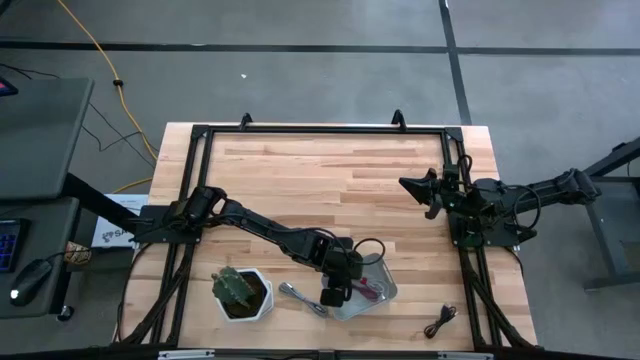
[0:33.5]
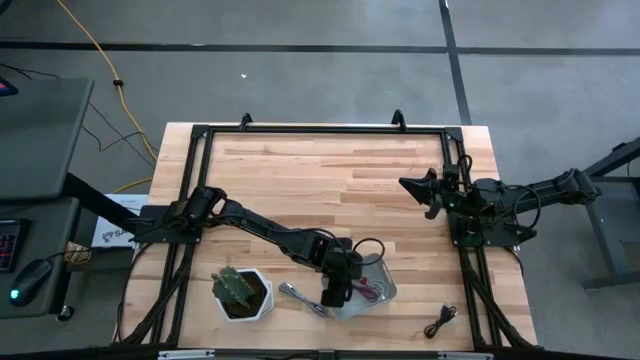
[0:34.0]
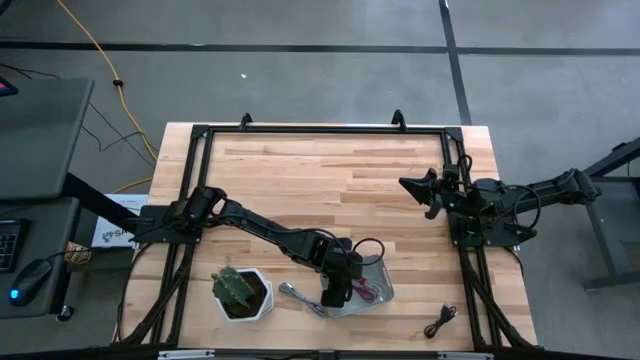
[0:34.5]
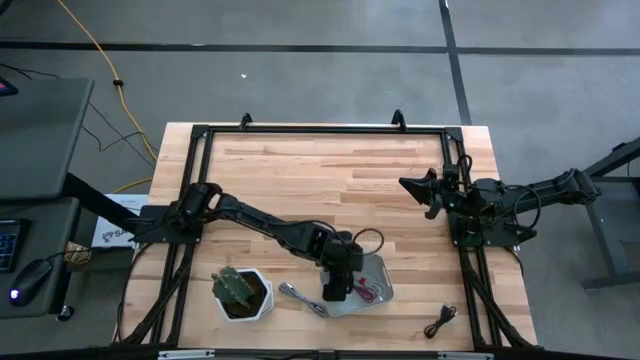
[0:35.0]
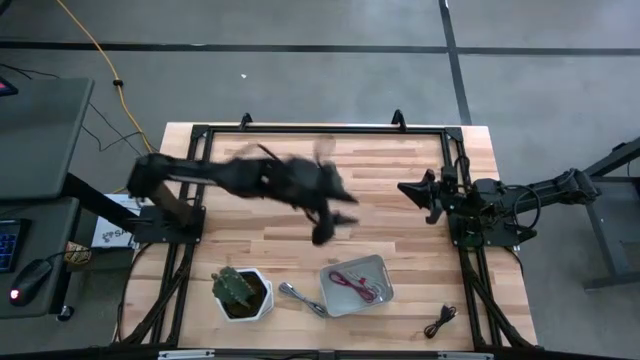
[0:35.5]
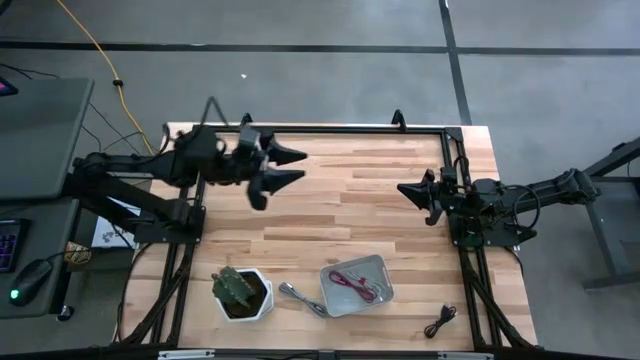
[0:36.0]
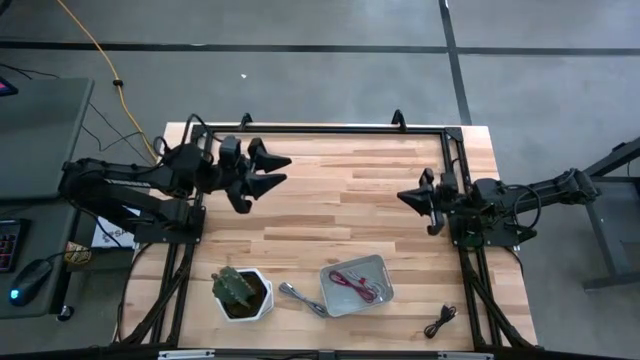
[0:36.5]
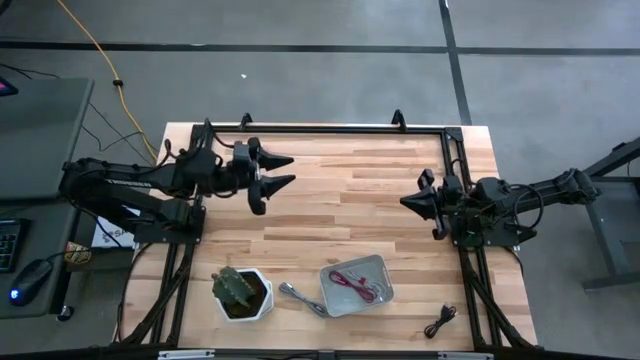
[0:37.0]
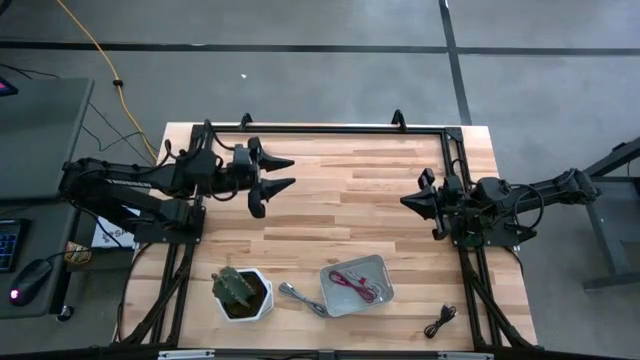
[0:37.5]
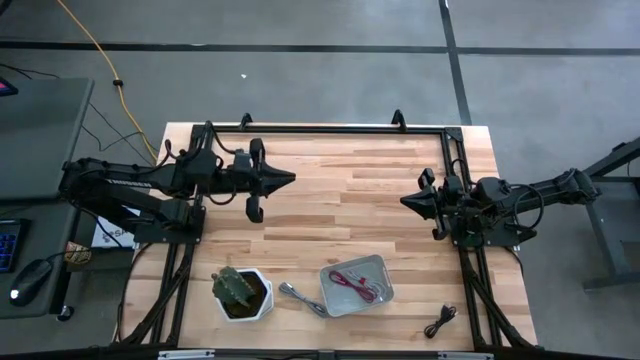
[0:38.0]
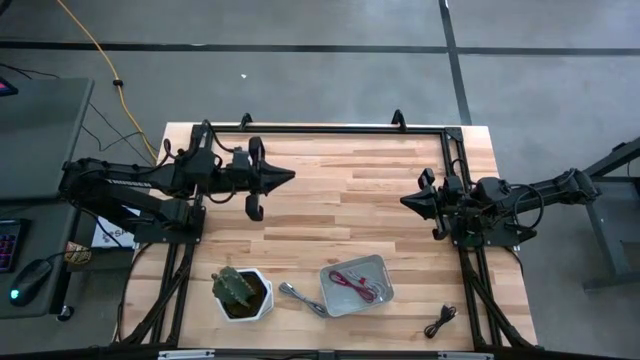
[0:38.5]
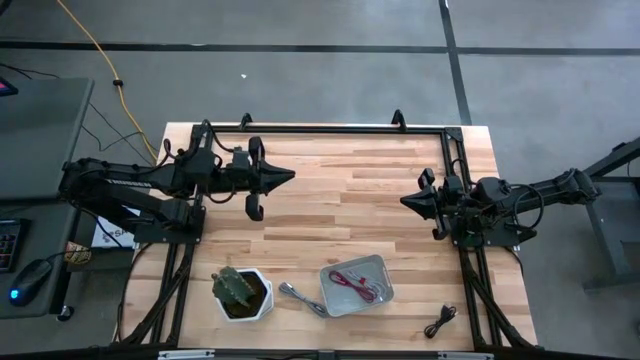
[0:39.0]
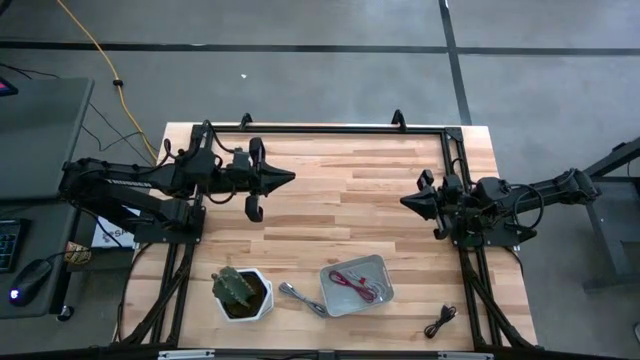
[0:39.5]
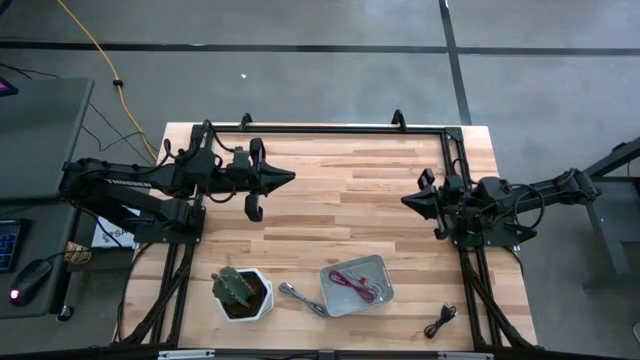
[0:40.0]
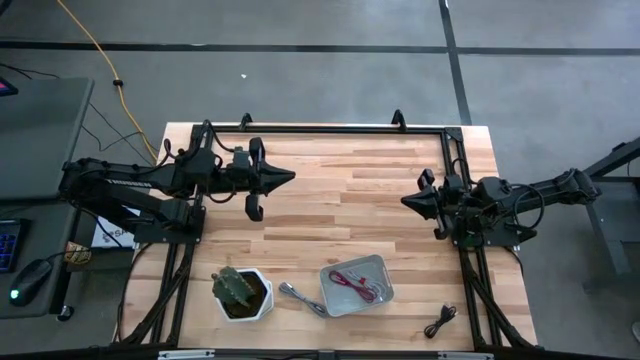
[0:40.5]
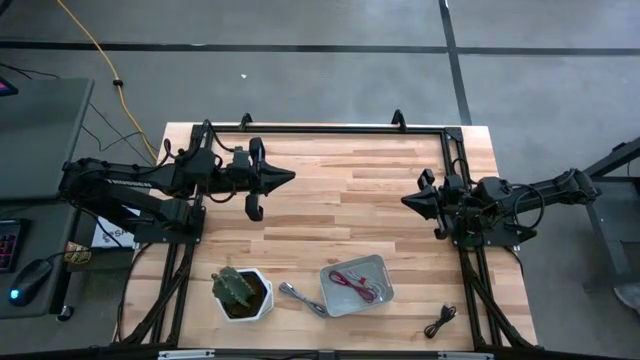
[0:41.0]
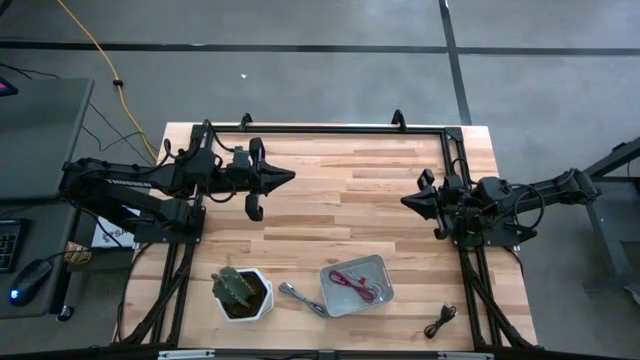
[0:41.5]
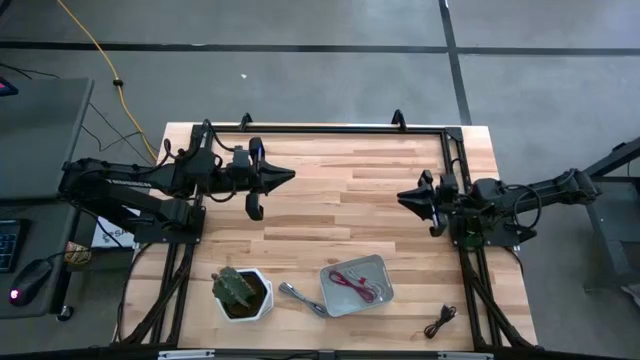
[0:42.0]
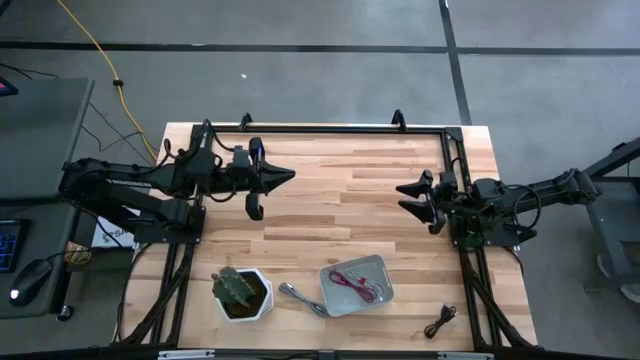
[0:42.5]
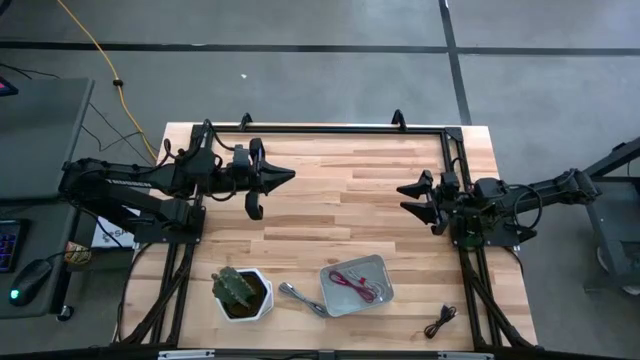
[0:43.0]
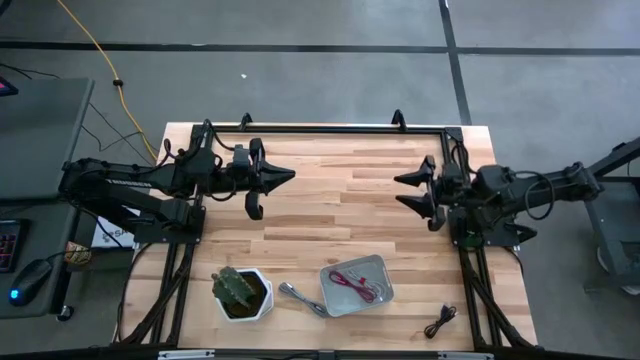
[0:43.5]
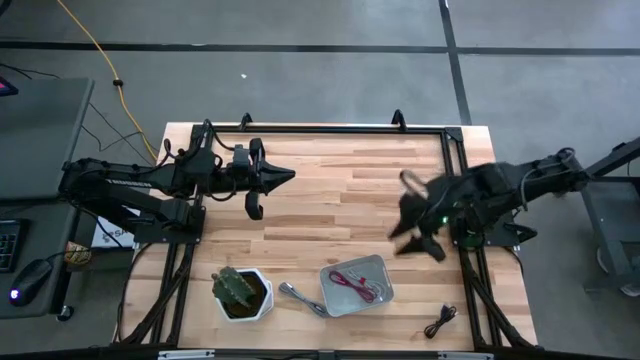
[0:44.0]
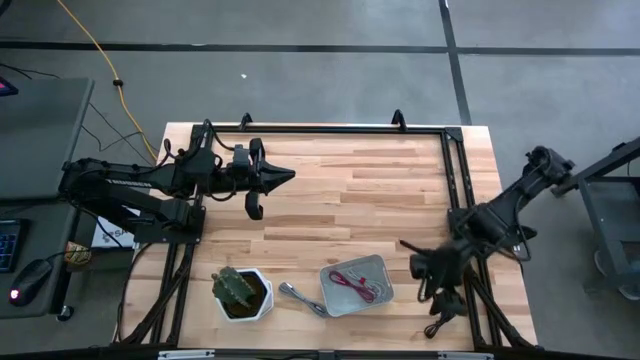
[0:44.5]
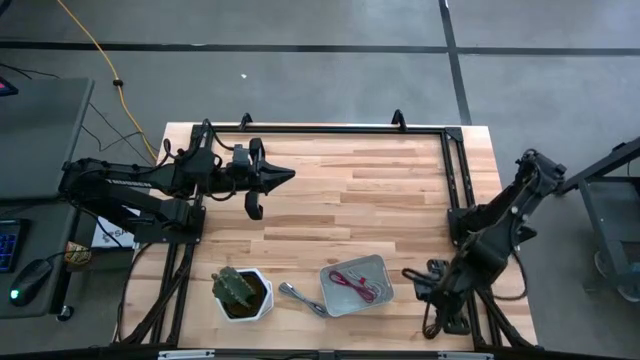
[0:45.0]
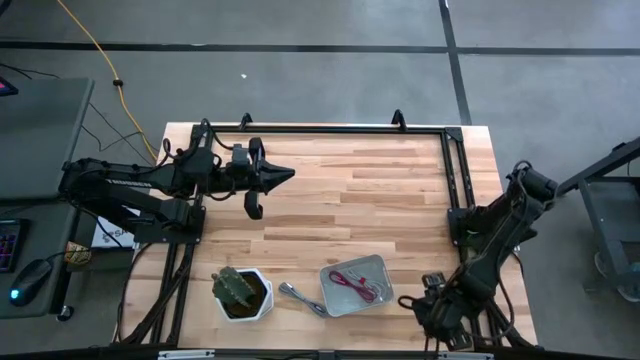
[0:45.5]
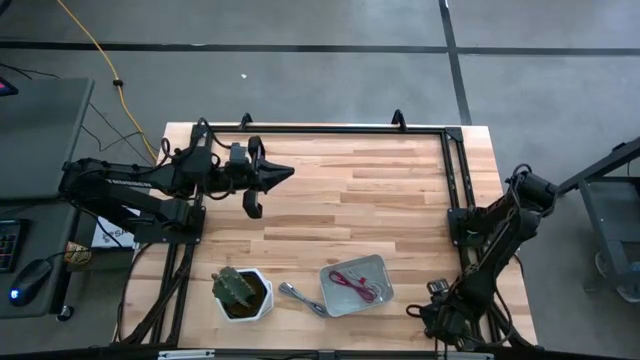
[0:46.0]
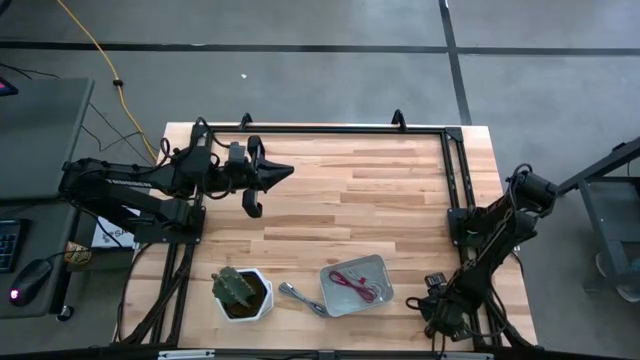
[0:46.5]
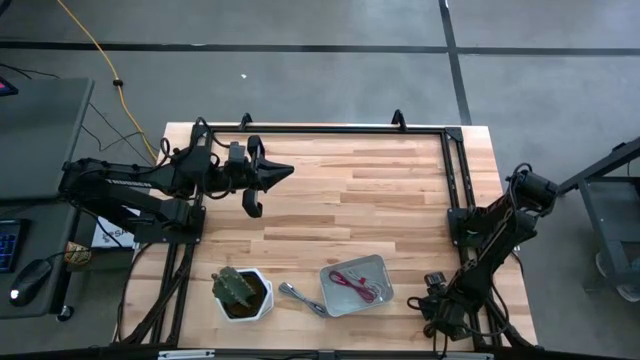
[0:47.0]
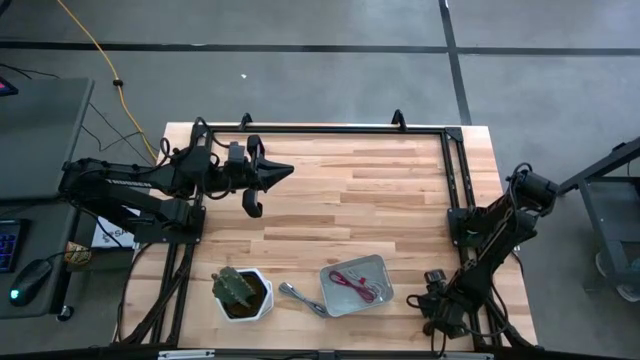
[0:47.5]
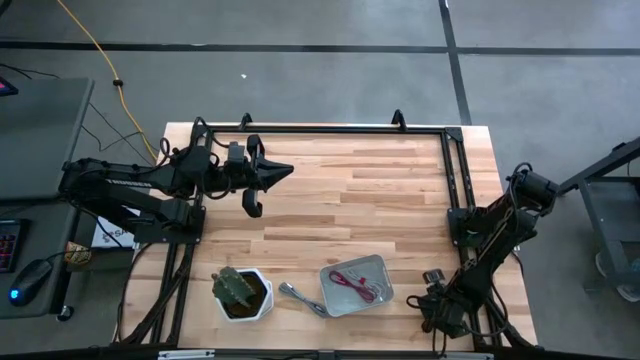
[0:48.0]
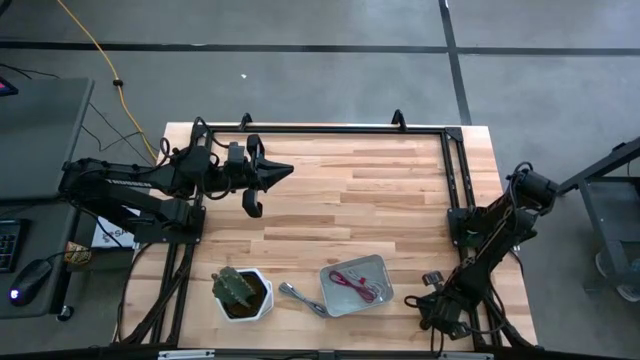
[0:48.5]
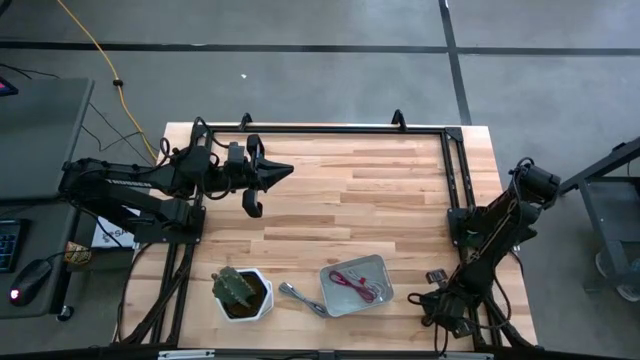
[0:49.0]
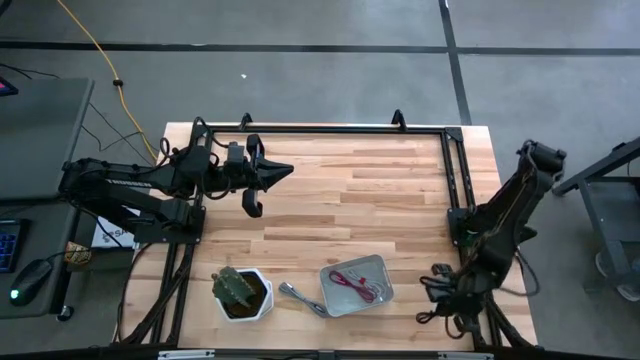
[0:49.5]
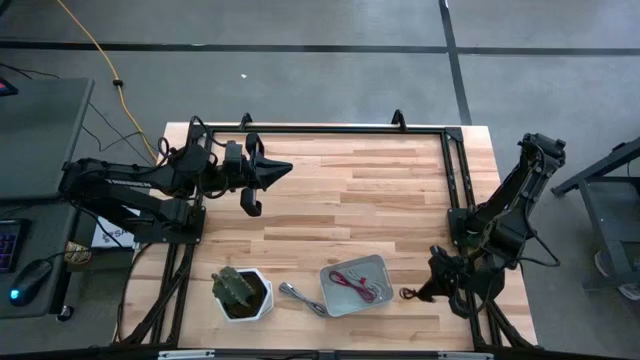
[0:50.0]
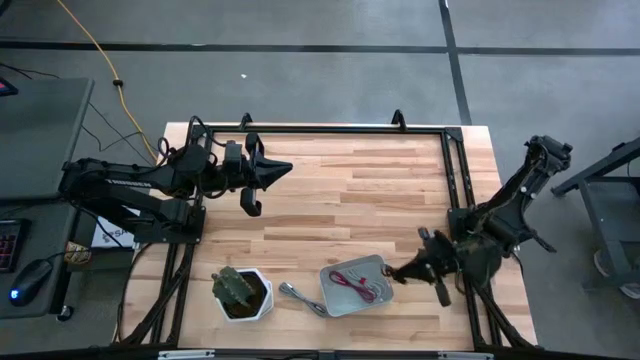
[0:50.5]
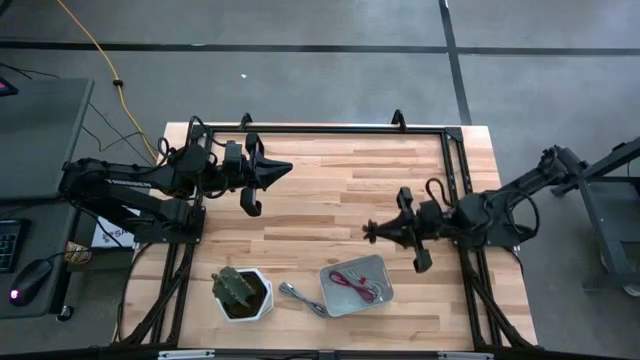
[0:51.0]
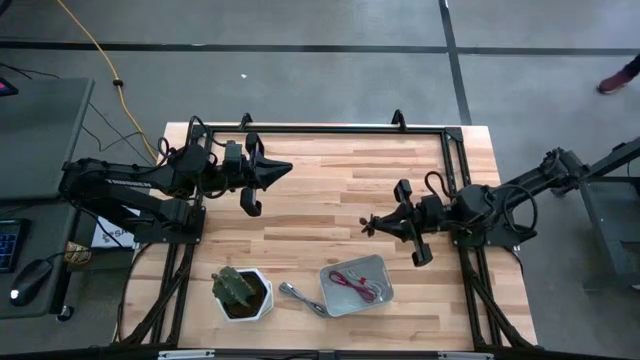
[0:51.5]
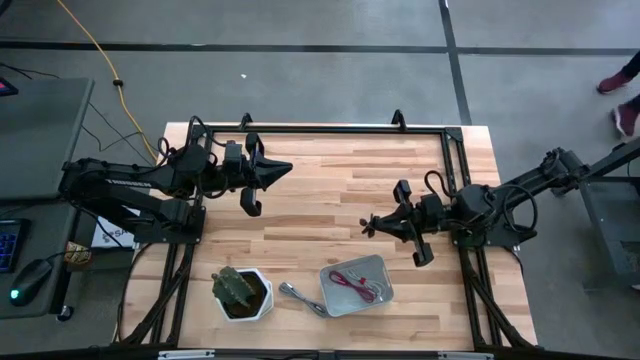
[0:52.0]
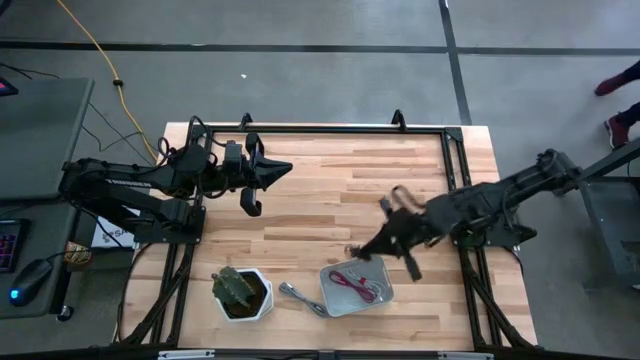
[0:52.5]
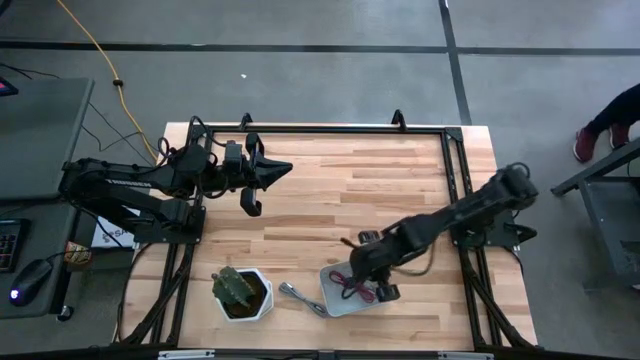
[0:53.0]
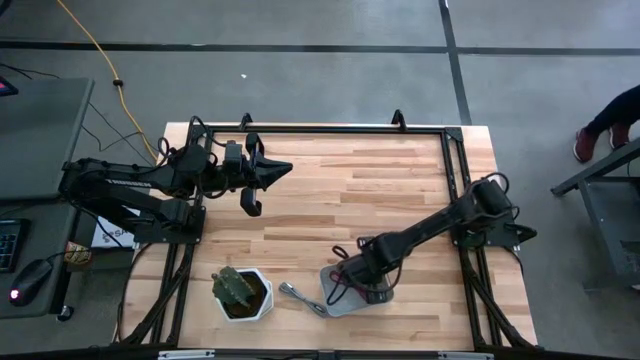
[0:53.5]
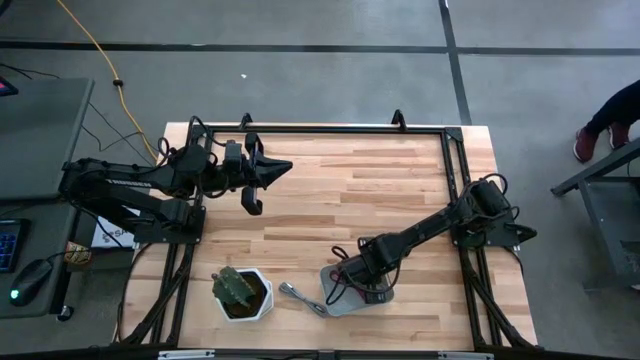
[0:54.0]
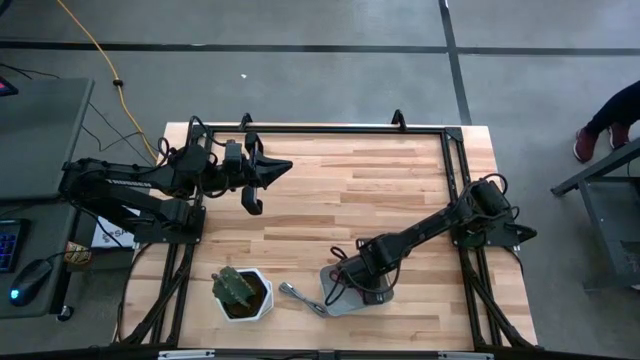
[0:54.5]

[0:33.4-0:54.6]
Task: Pick and place USB-C Cables
Put the black charger cable into the gray bin
